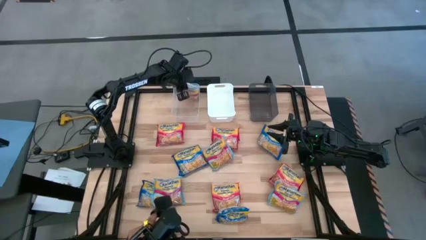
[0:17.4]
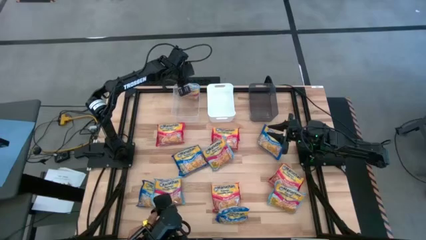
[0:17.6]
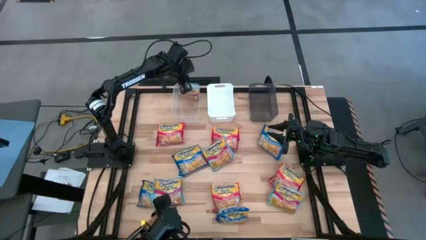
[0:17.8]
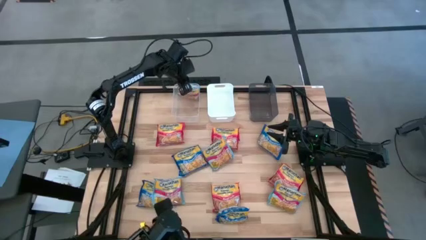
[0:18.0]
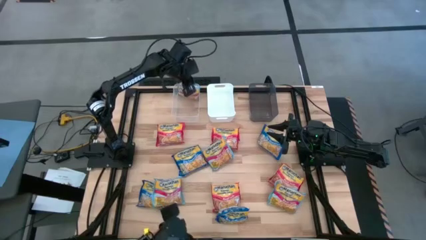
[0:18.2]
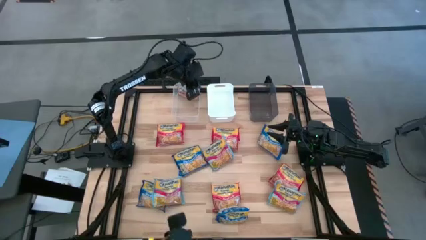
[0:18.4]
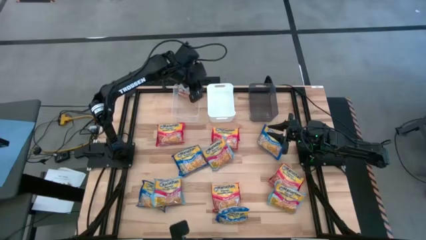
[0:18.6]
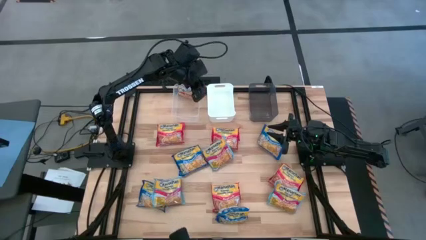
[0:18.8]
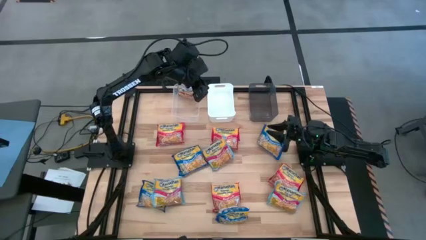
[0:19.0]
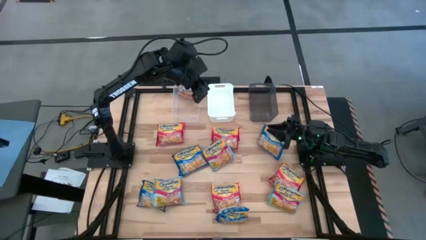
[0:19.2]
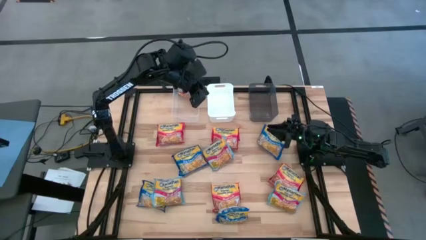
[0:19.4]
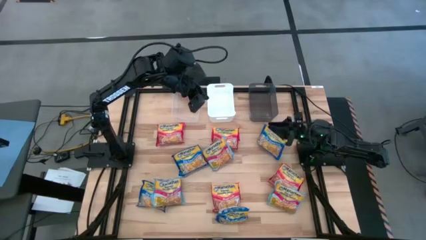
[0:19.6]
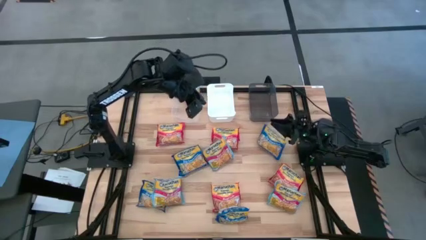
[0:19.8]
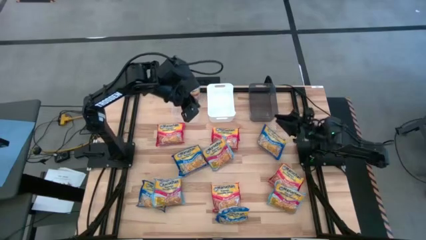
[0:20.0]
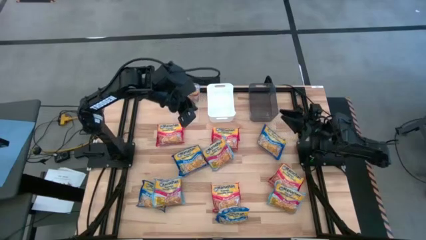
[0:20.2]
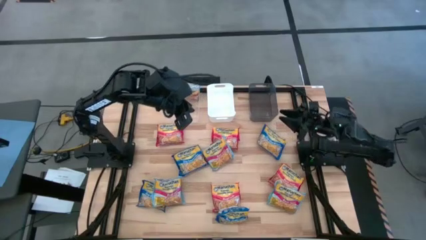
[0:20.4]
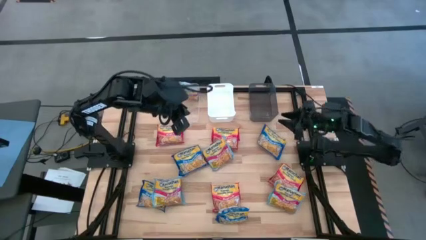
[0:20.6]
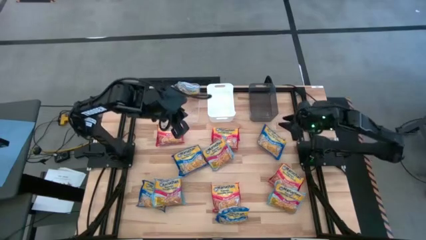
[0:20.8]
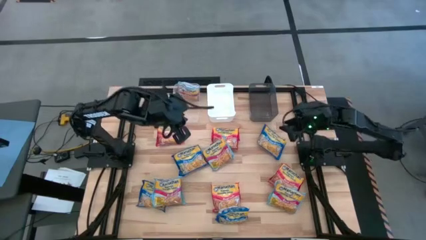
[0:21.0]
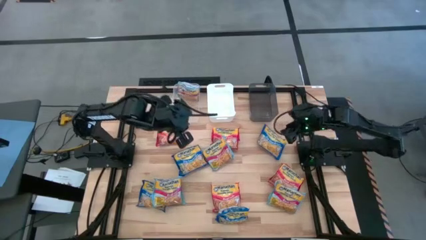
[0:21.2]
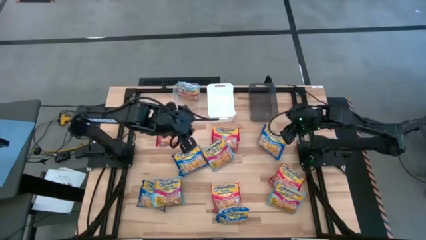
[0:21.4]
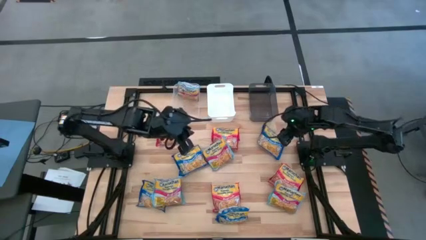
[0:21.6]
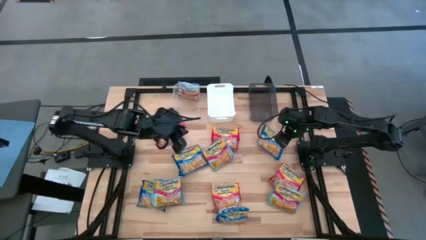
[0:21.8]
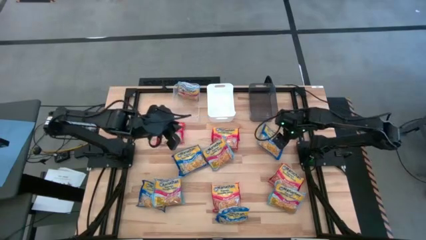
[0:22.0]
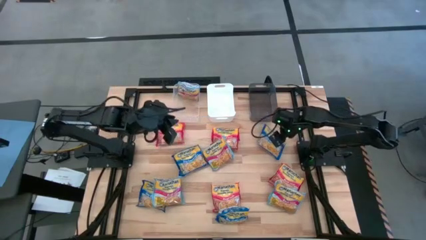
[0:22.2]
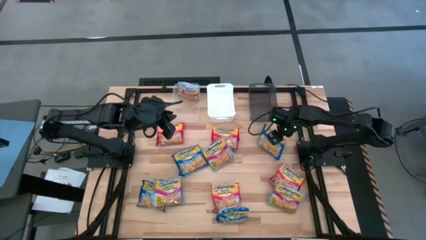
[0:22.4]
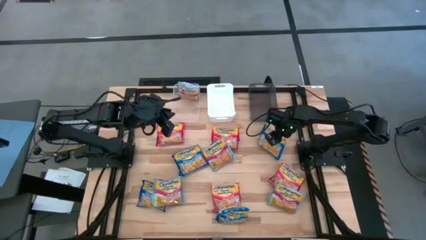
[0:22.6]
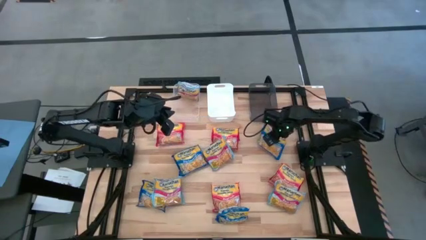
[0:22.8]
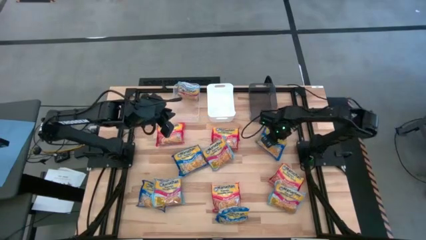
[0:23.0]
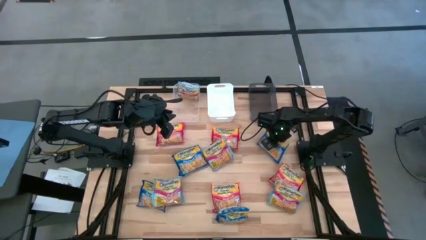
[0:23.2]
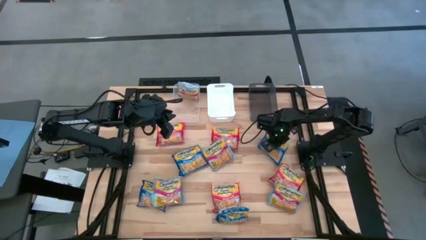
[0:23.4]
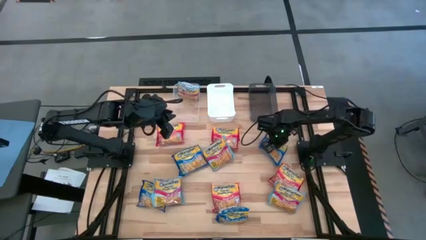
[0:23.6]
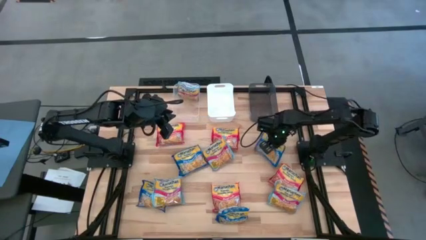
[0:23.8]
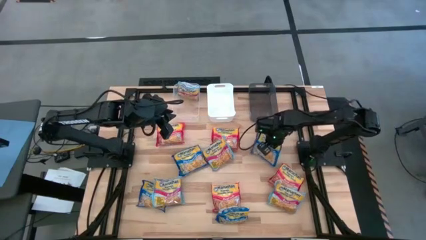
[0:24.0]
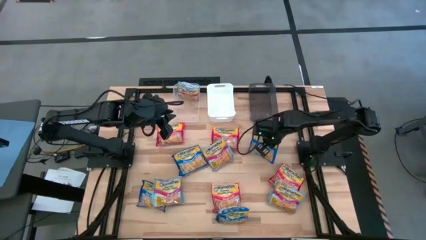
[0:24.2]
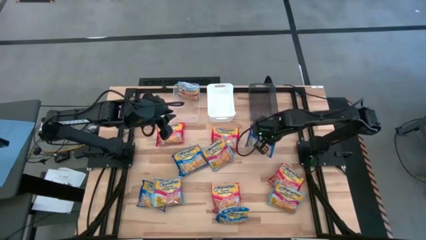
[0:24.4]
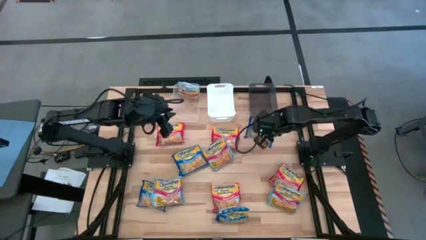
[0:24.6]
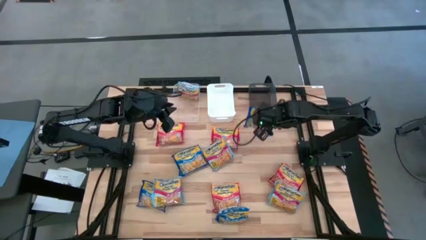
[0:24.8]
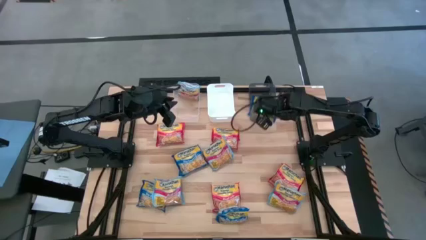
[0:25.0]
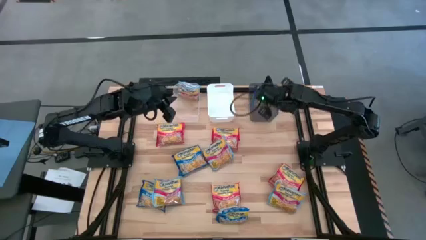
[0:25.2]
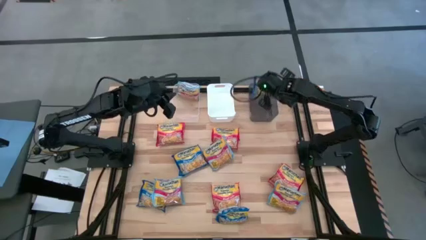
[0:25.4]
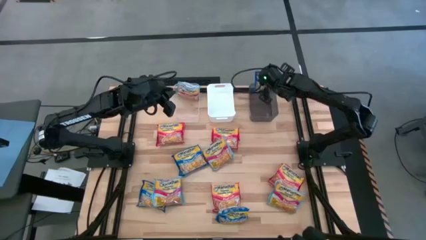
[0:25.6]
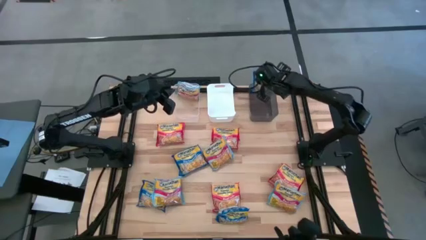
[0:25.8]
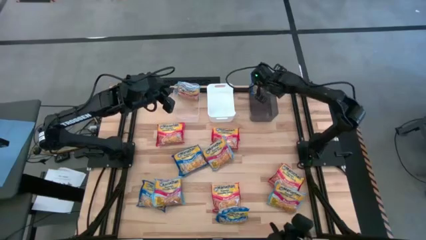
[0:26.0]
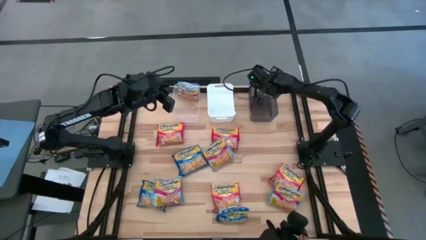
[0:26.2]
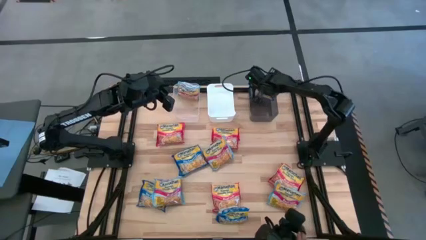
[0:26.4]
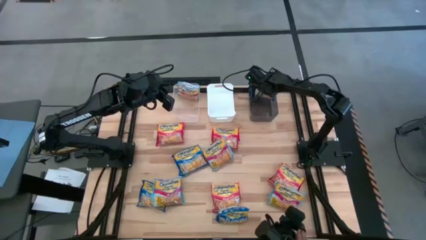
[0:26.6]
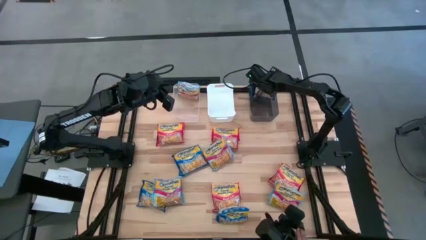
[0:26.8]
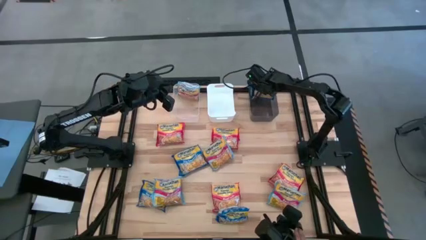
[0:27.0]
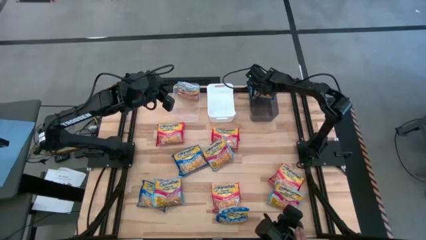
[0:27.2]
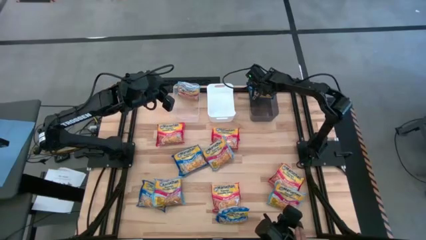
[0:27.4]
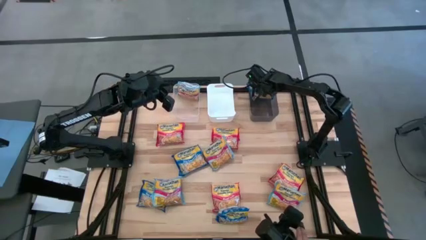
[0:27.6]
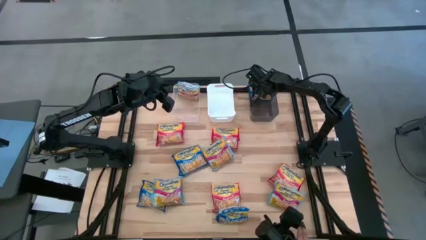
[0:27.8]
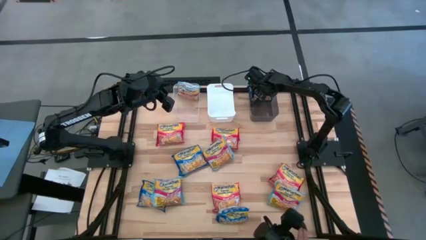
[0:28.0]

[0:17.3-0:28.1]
Task: Sort Maruchan noodles
Put the blue bag into the black bin
